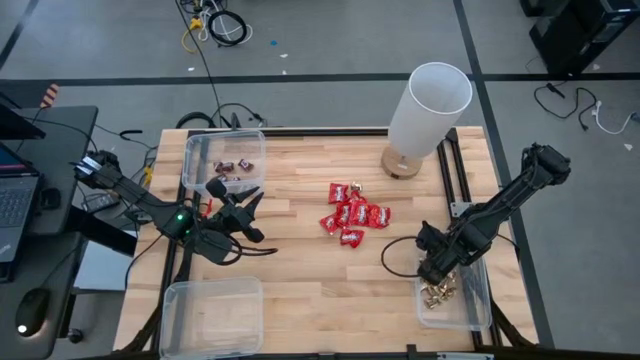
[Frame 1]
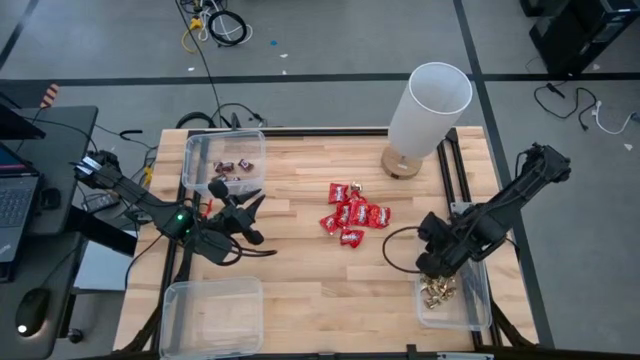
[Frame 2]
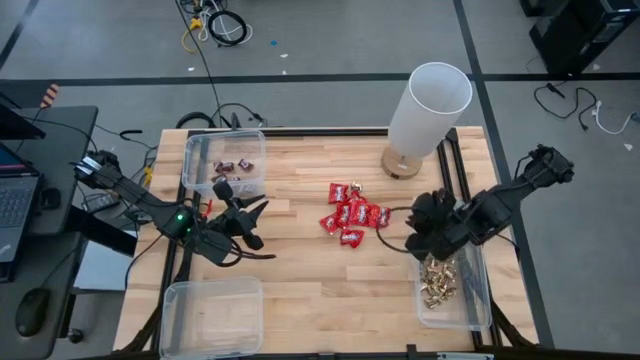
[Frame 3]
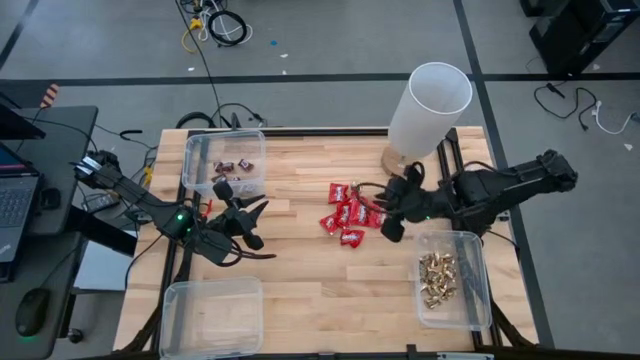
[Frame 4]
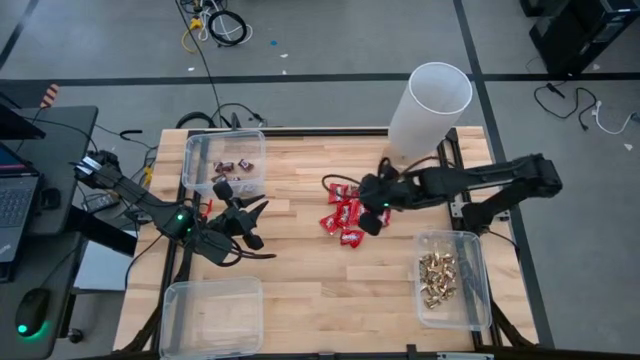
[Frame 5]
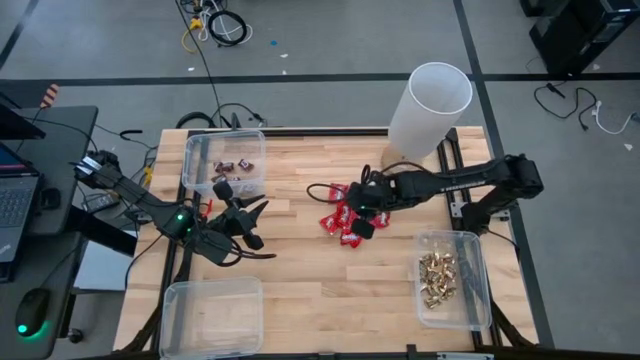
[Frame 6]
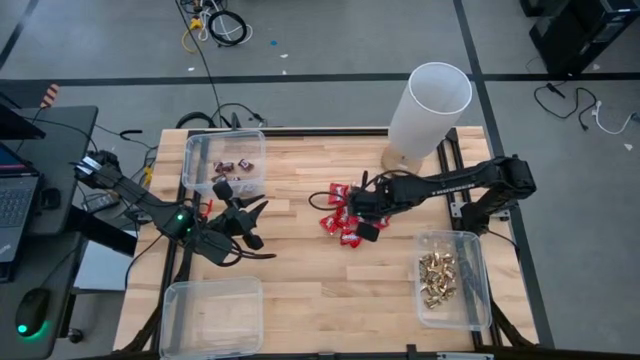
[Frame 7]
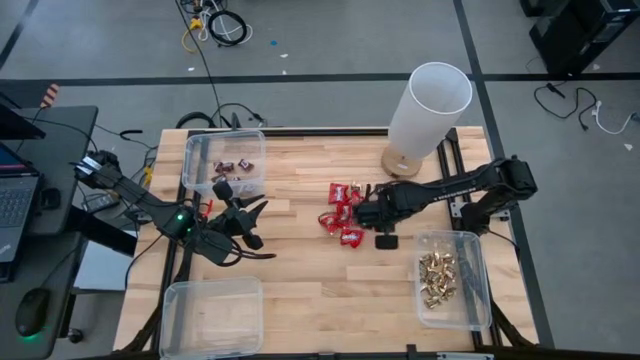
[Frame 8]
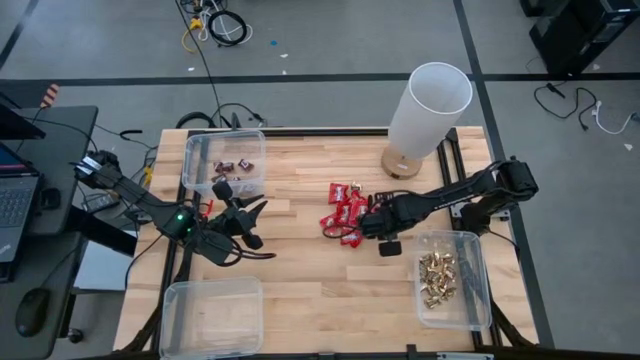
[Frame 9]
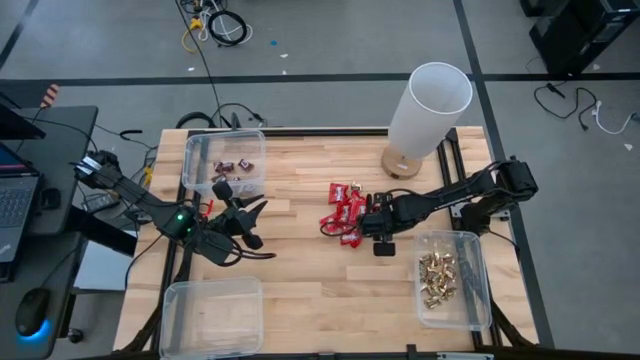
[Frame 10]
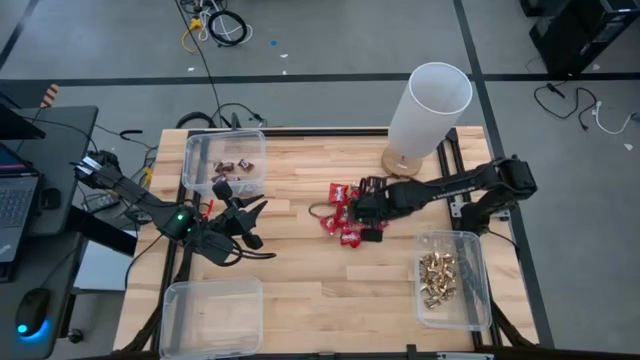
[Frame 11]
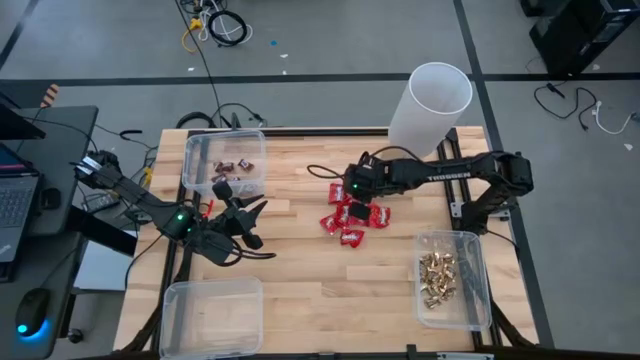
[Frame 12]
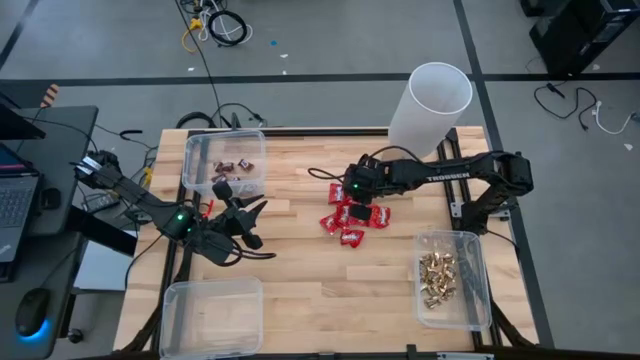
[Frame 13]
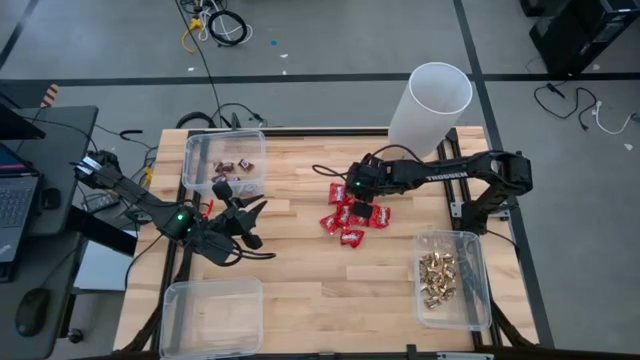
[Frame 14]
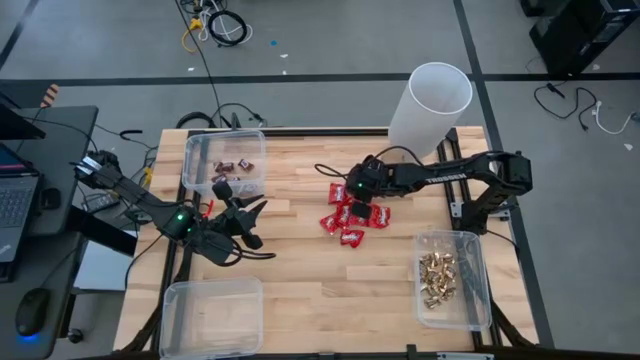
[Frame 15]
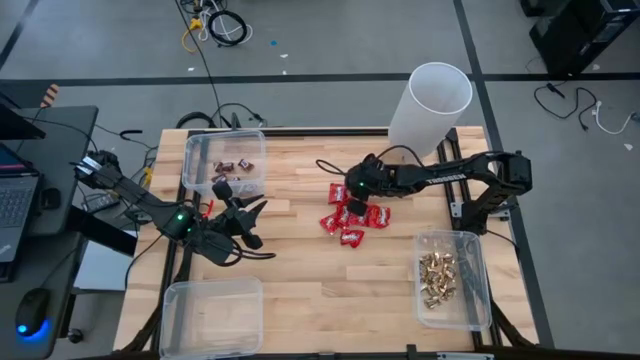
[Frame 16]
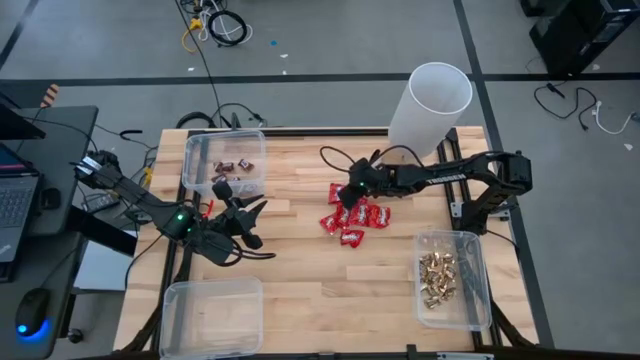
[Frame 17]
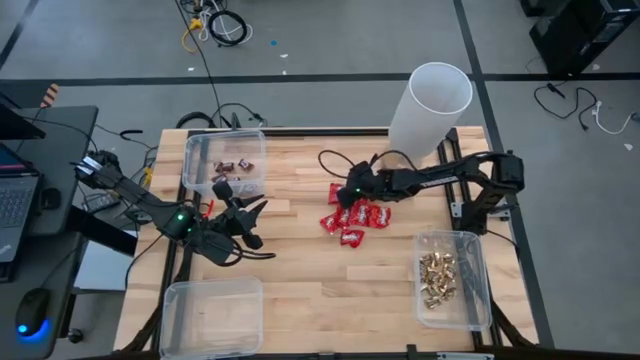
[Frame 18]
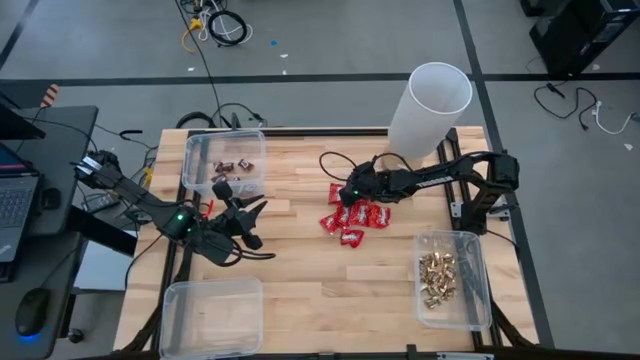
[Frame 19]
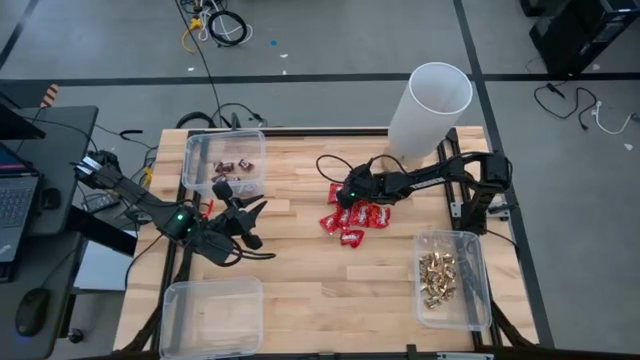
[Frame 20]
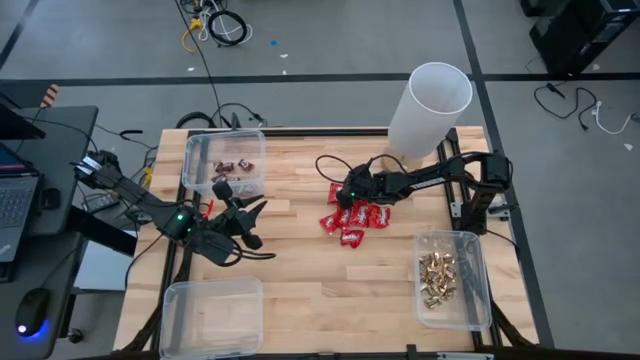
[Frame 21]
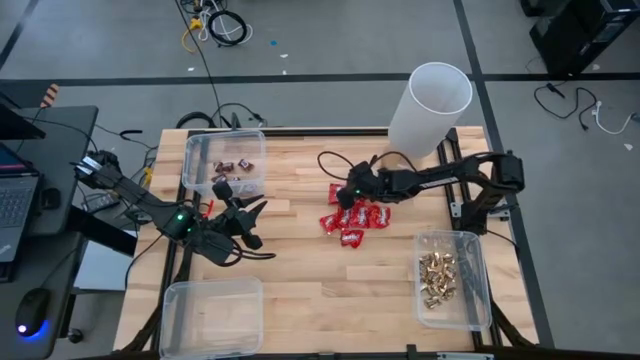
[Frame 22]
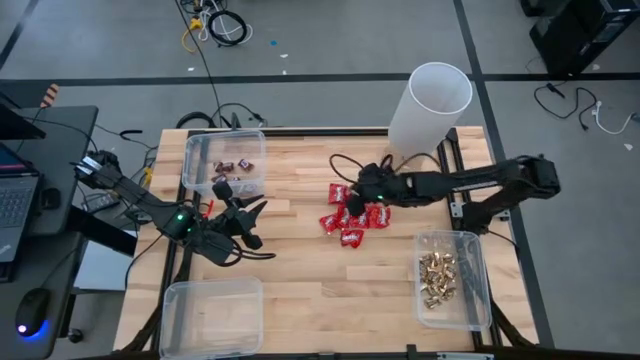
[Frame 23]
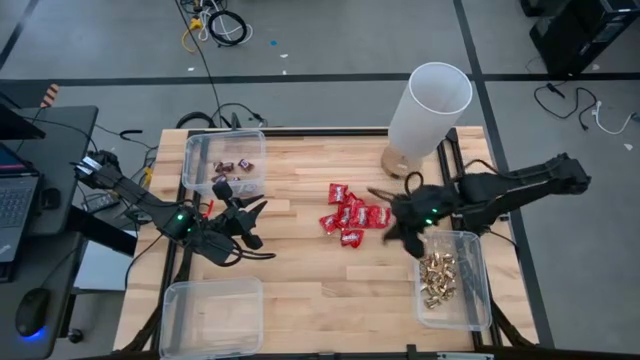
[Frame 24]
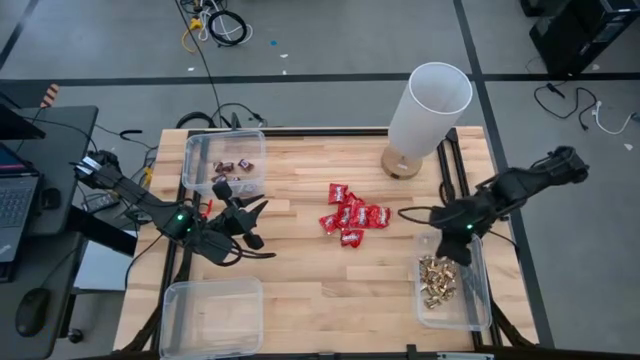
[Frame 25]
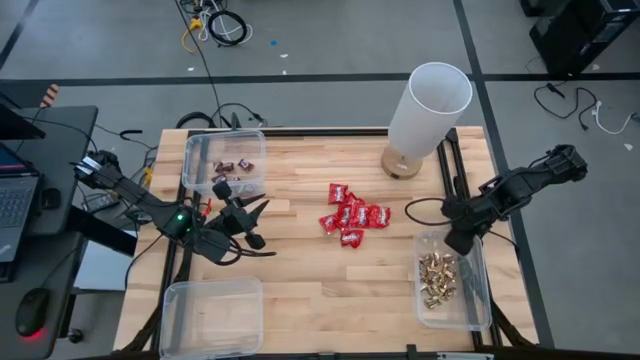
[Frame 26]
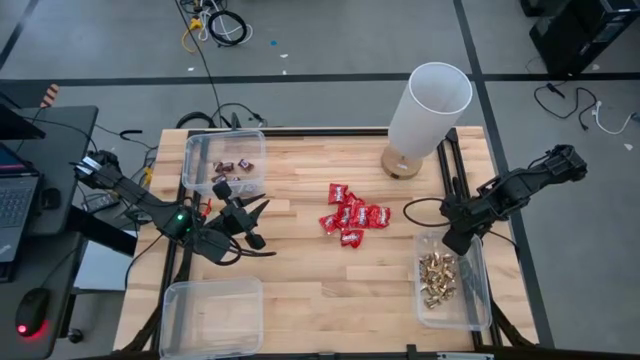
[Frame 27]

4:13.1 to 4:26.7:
Task: Sort candy
Put the gold chocolate into the bottom right transparent bin

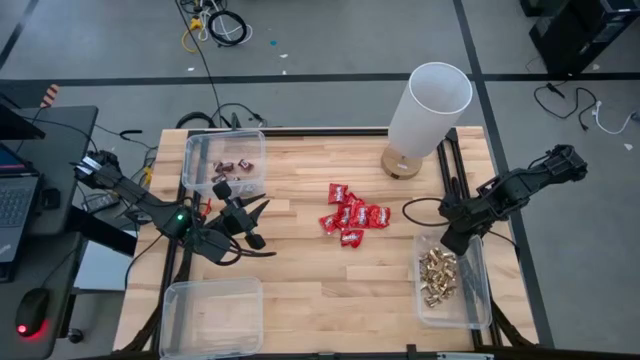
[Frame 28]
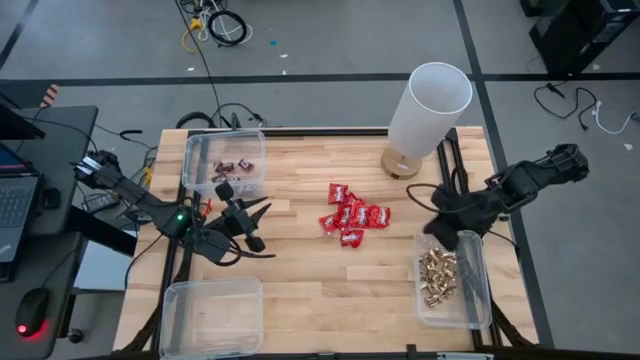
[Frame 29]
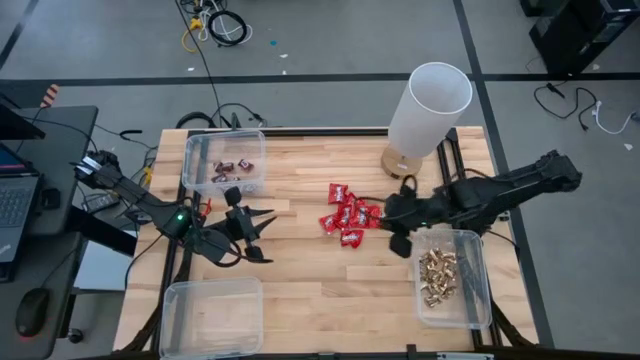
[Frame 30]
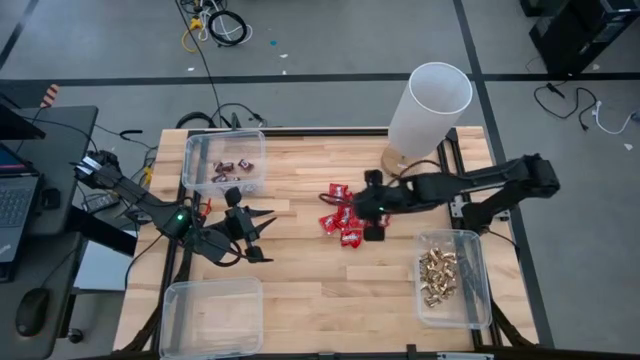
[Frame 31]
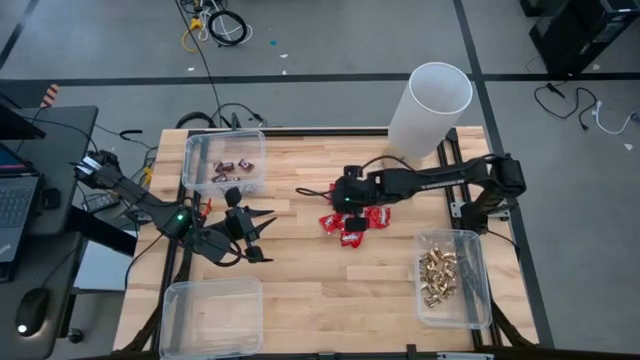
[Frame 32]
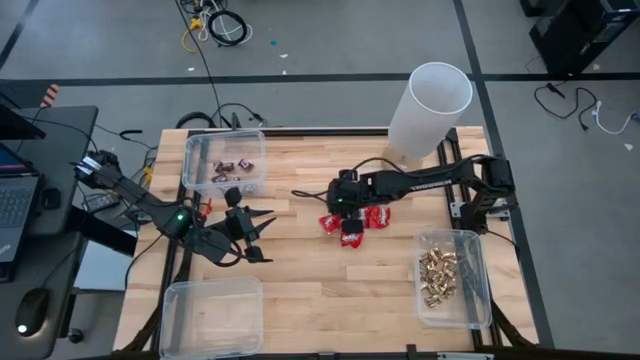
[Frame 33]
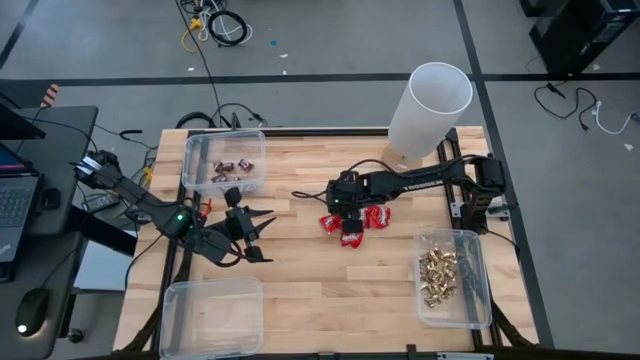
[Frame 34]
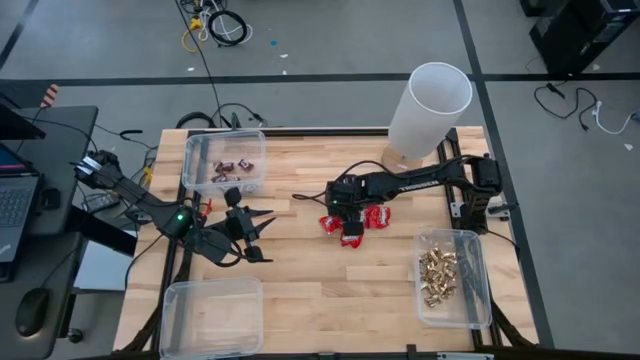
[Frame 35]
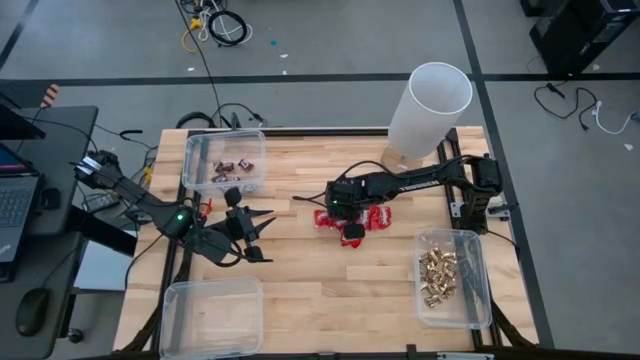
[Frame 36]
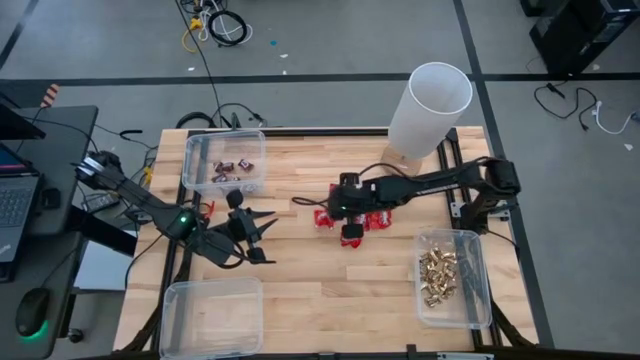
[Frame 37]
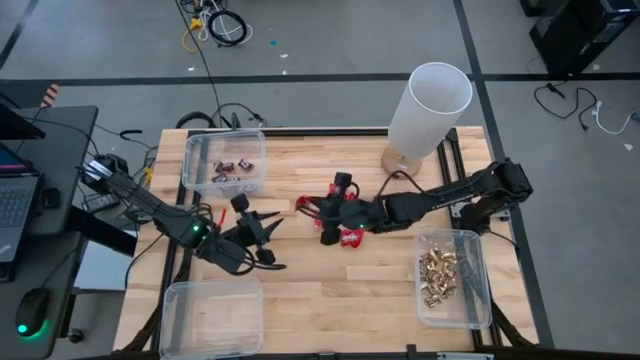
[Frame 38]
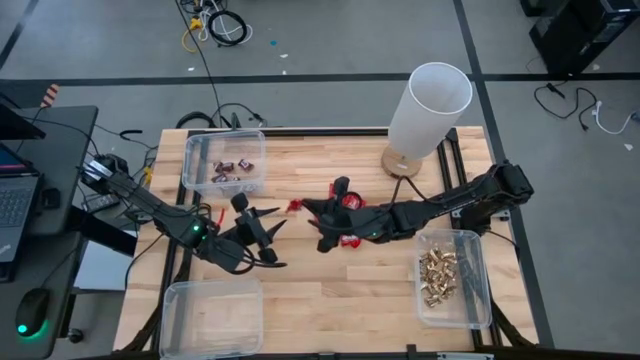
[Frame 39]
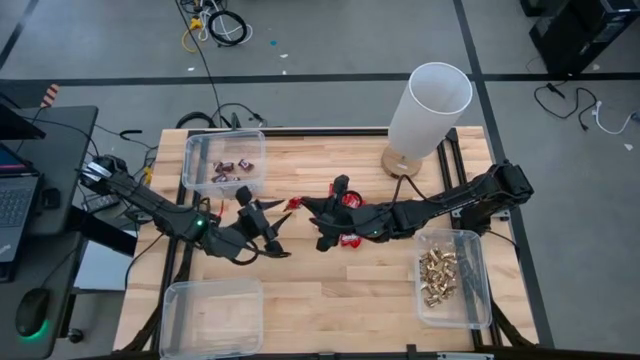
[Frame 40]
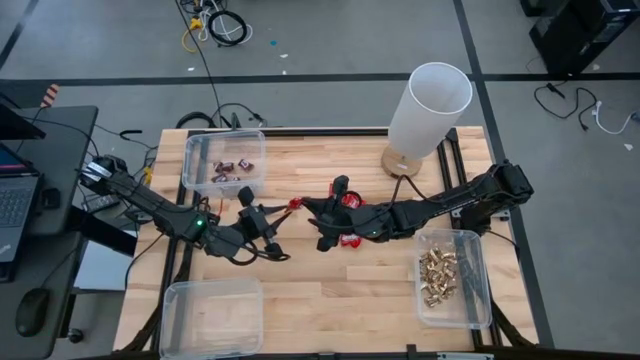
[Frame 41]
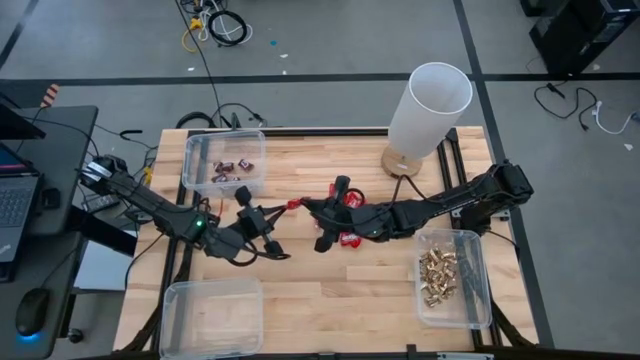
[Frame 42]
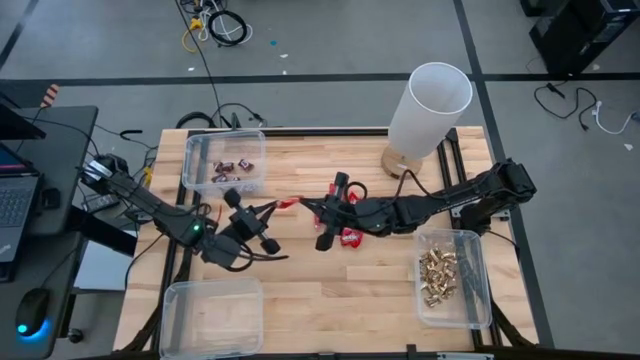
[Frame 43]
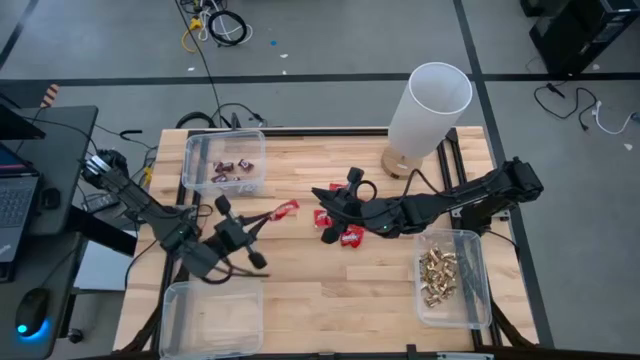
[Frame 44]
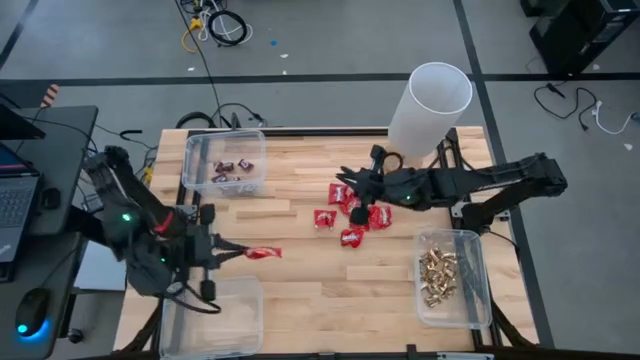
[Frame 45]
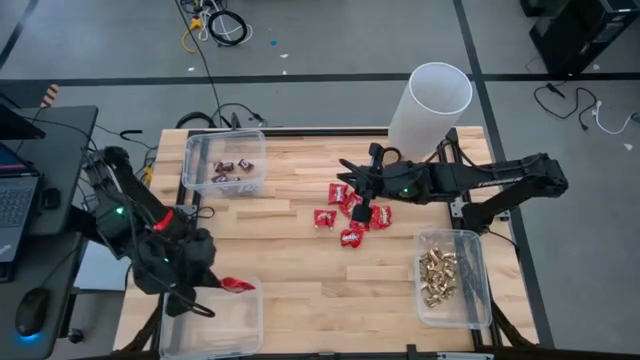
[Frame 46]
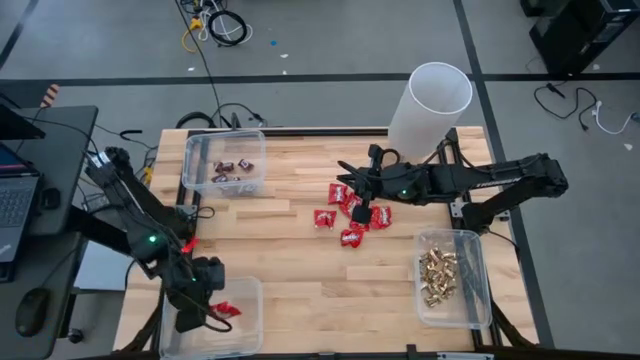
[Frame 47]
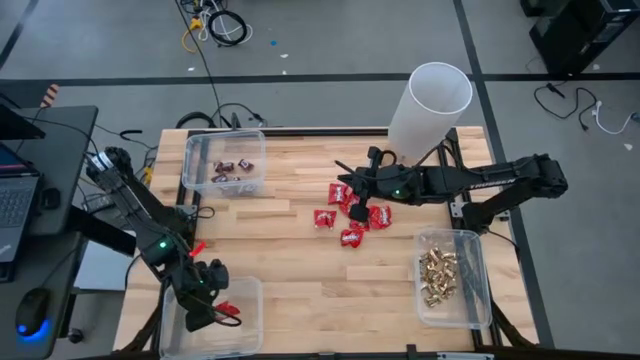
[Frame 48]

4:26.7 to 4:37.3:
Put the red chocolate into the bottom left transparent bin
